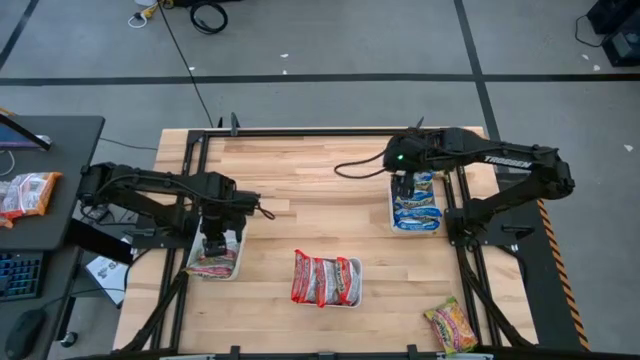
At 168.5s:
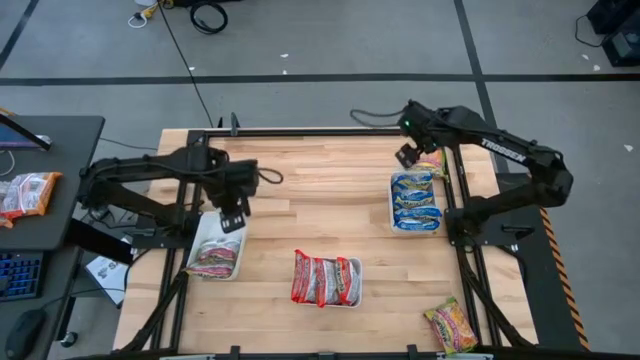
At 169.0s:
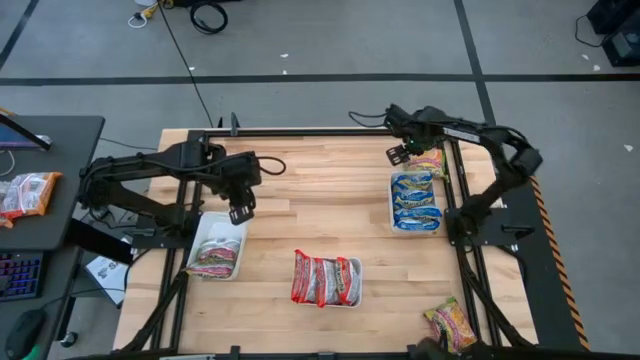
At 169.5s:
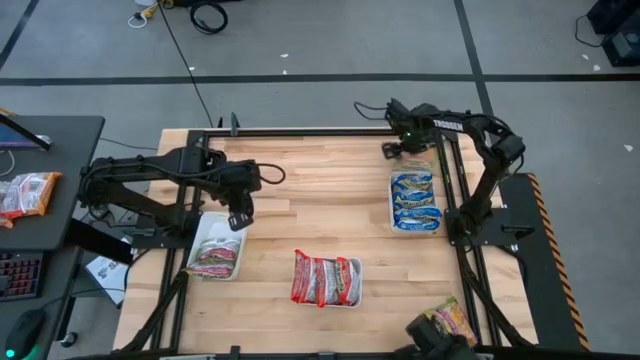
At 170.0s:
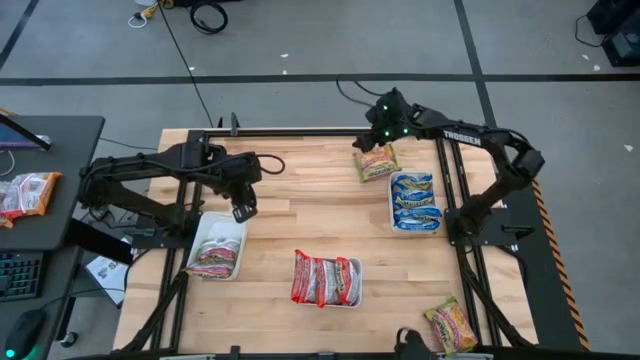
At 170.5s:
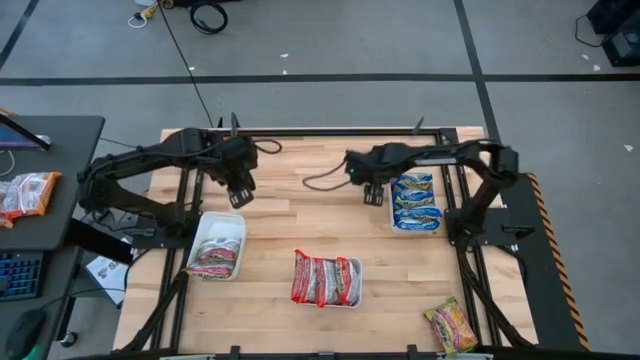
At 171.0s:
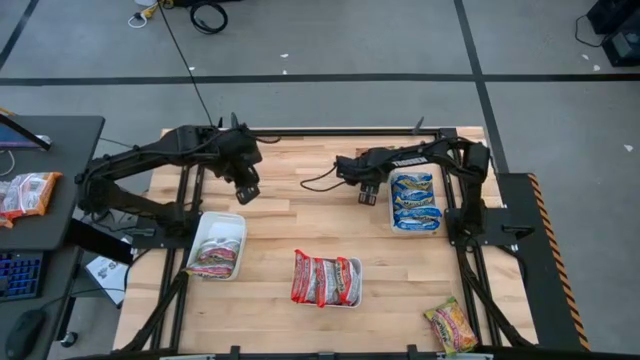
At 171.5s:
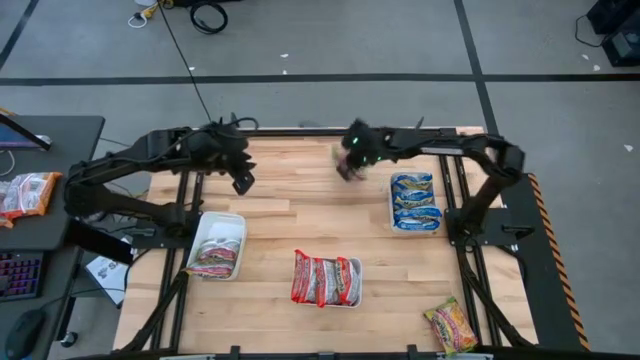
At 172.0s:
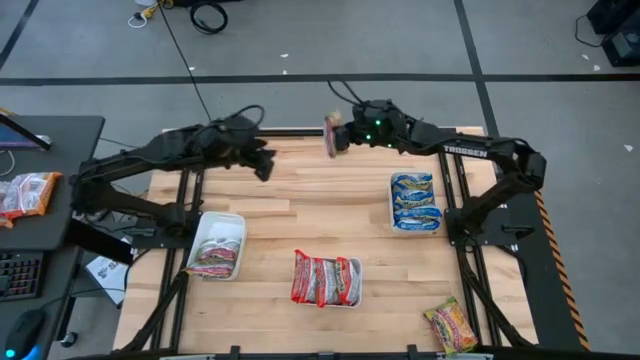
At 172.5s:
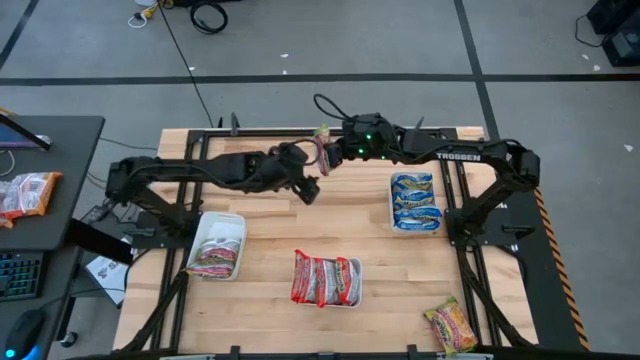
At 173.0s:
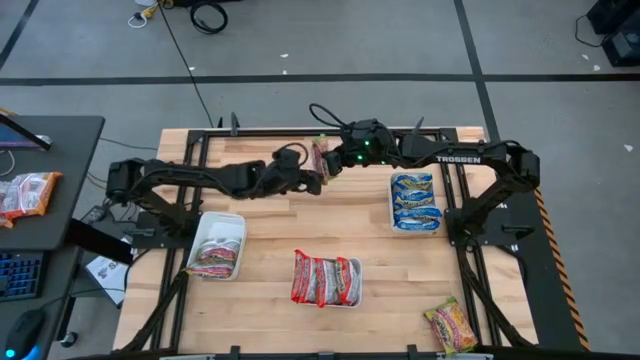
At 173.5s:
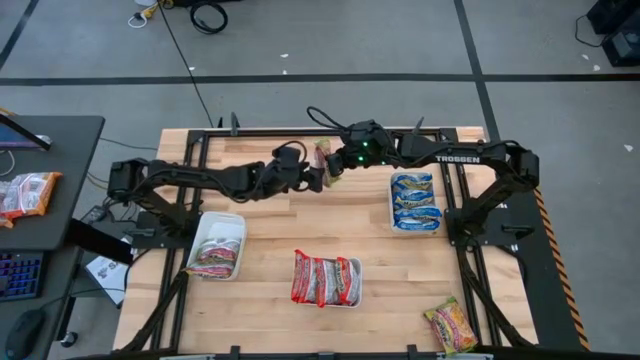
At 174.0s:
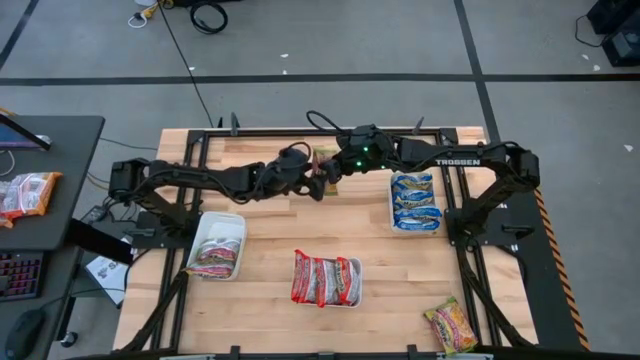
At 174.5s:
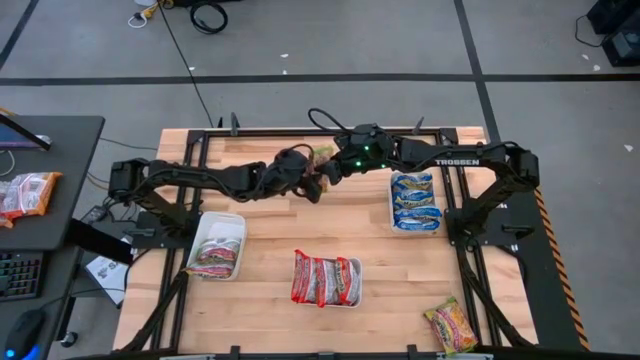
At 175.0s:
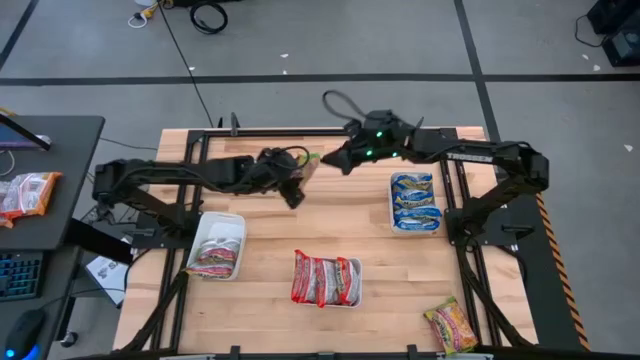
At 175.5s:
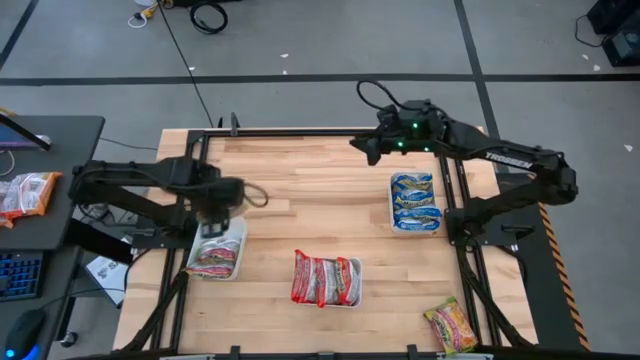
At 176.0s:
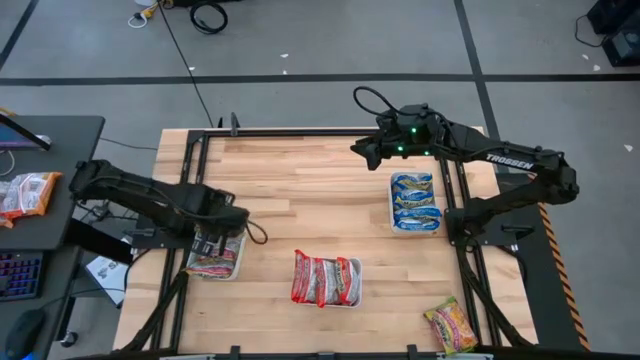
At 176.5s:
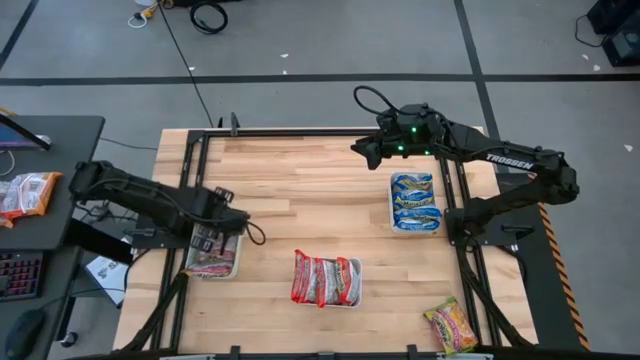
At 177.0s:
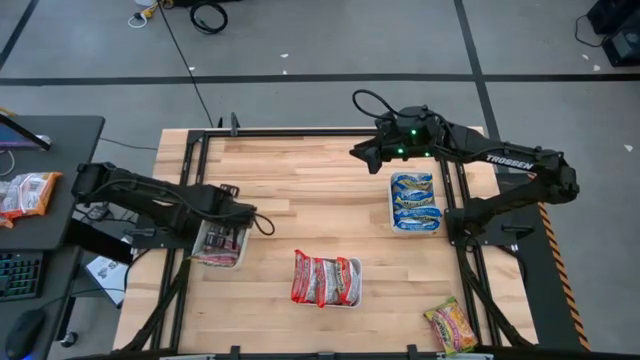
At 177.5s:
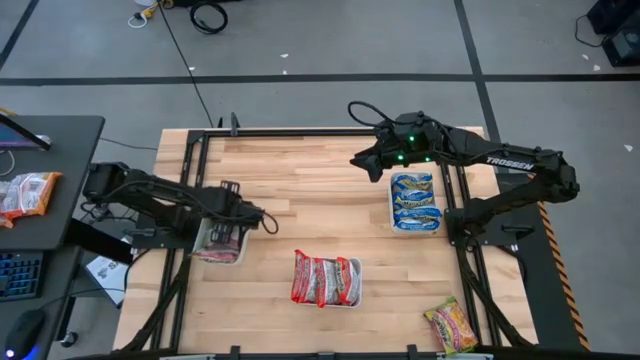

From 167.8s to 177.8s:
Task: Sort Maruchan noodles
Put the top green noodle pack into the left white bin

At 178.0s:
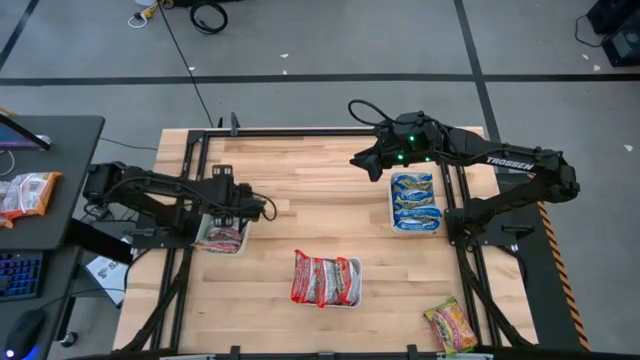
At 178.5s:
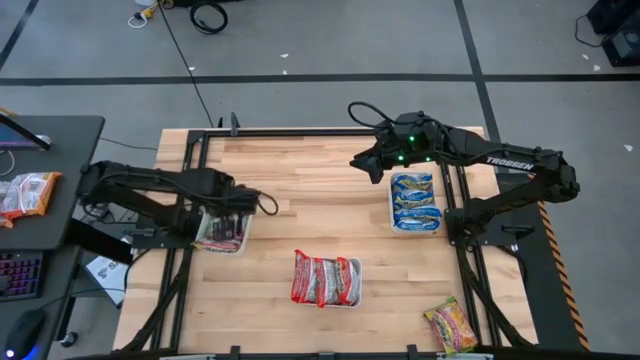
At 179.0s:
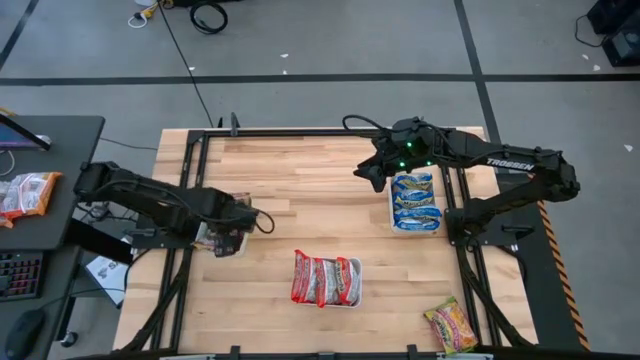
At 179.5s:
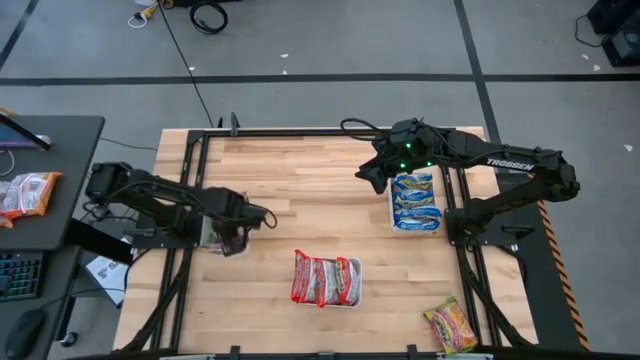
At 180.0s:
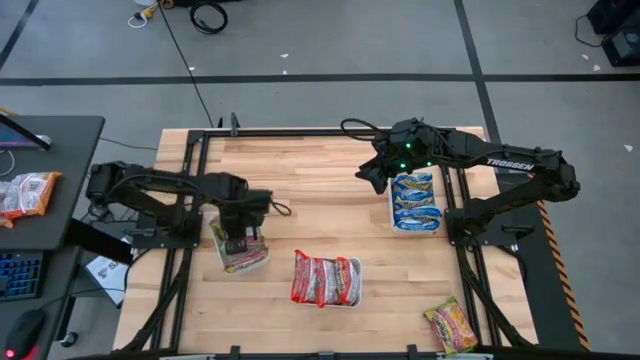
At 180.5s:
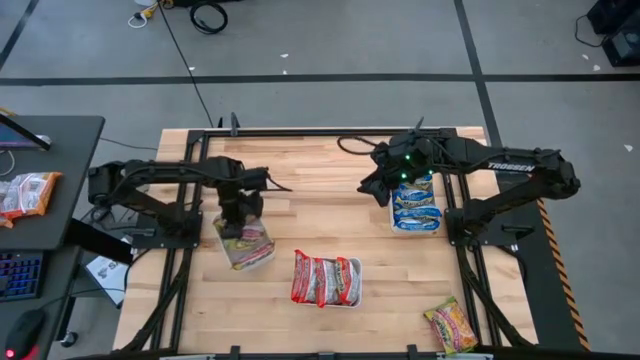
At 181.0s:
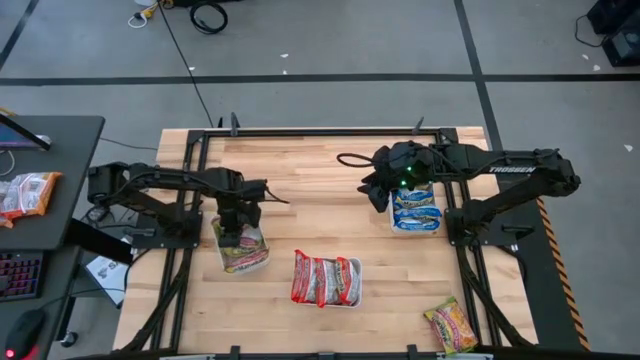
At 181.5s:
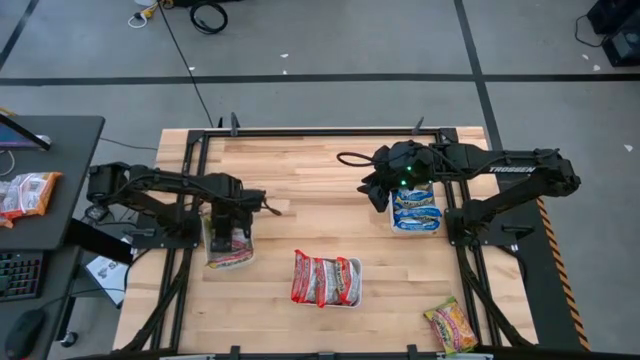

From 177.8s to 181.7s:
Adjust the green noodle pack on the left white bin

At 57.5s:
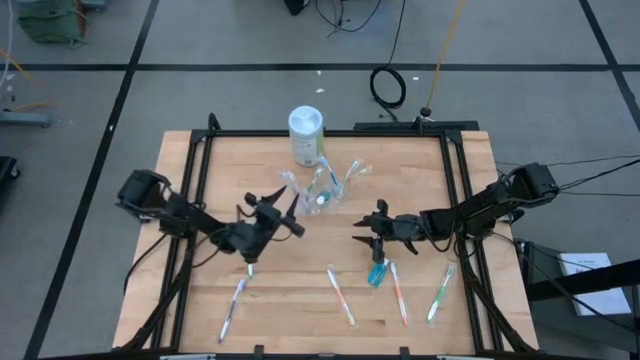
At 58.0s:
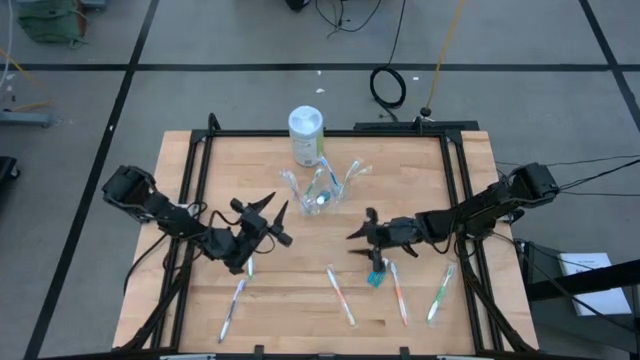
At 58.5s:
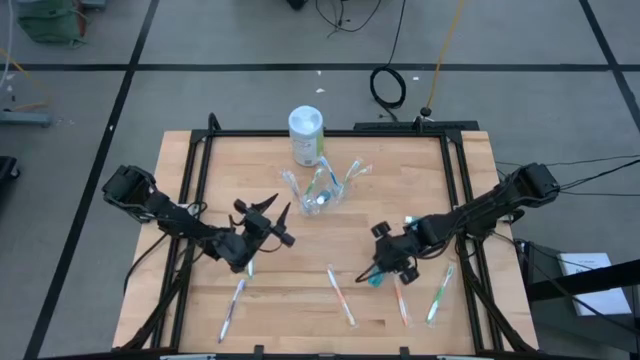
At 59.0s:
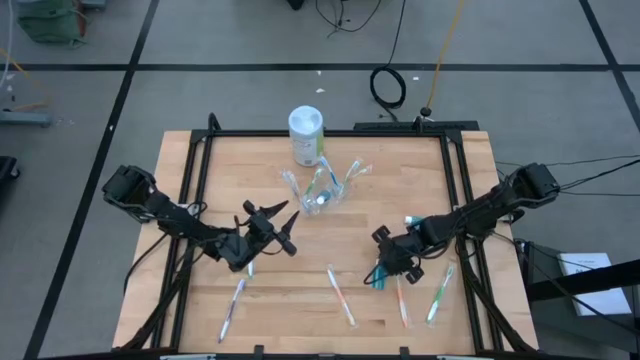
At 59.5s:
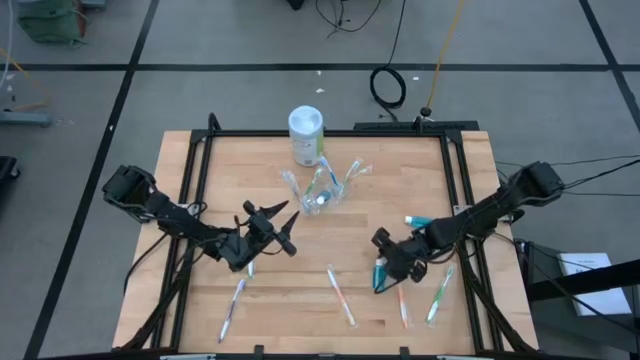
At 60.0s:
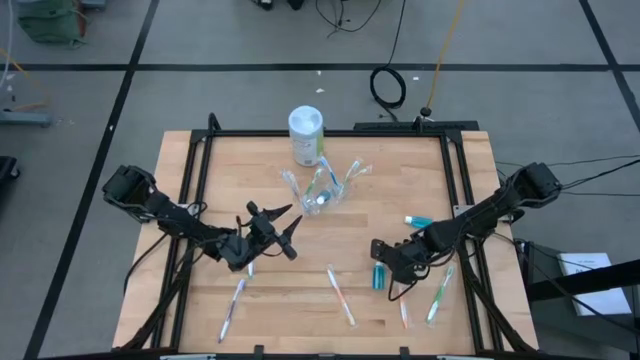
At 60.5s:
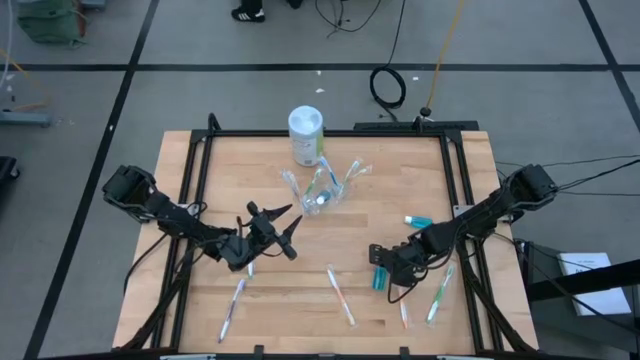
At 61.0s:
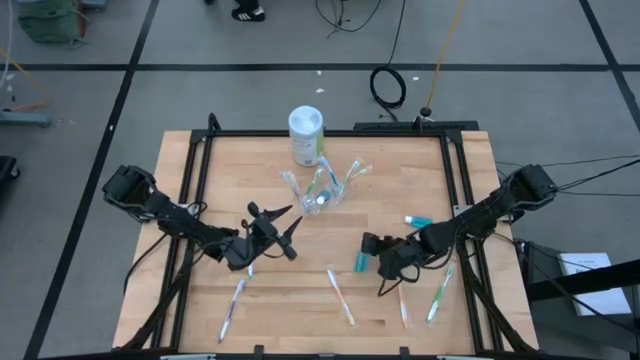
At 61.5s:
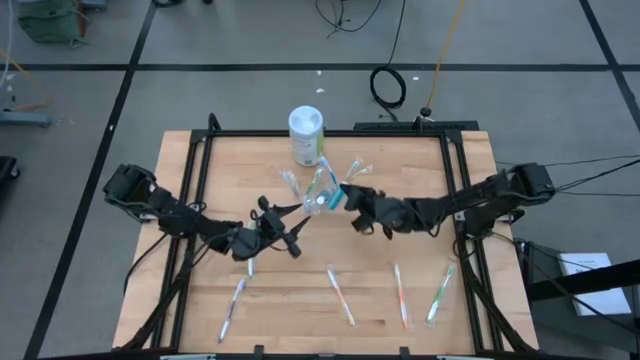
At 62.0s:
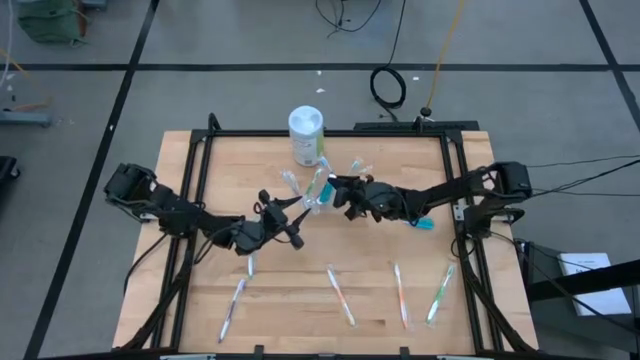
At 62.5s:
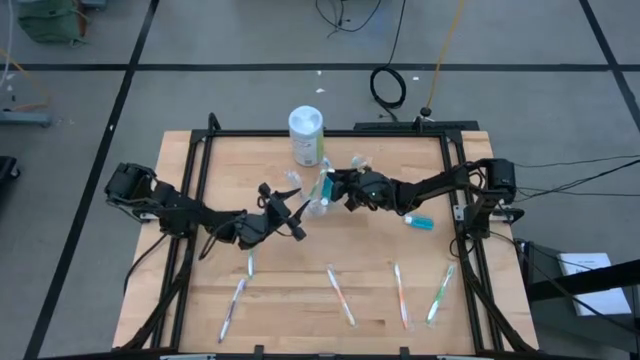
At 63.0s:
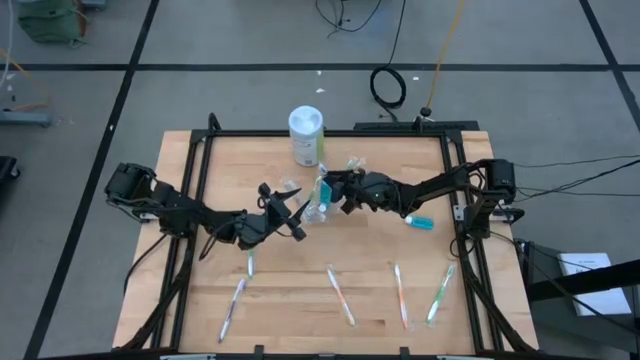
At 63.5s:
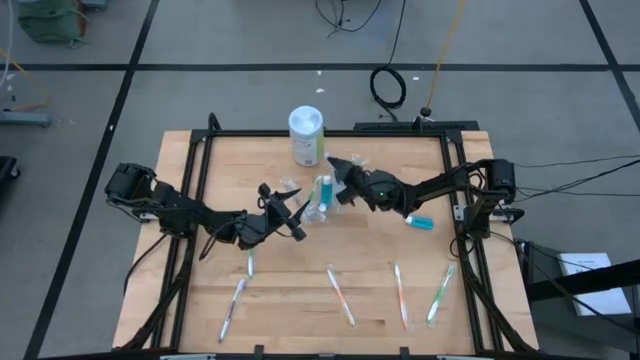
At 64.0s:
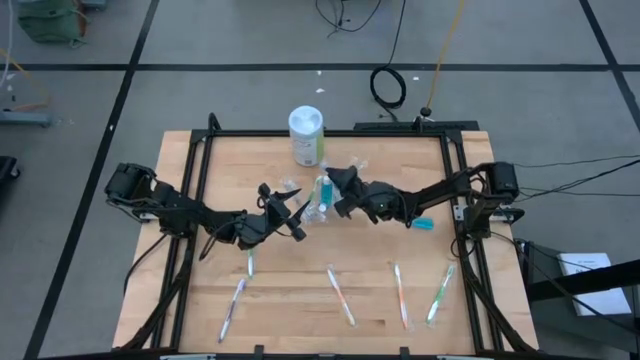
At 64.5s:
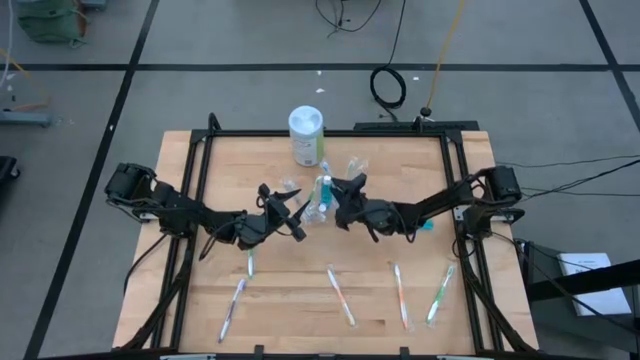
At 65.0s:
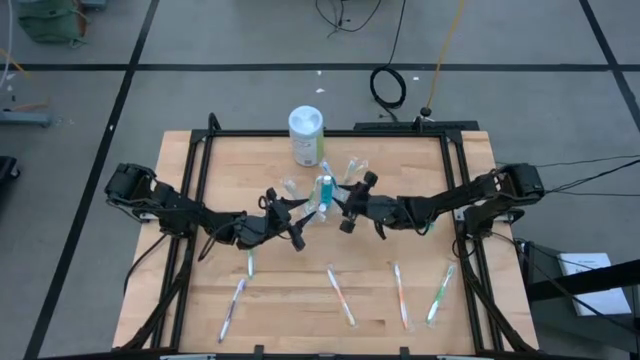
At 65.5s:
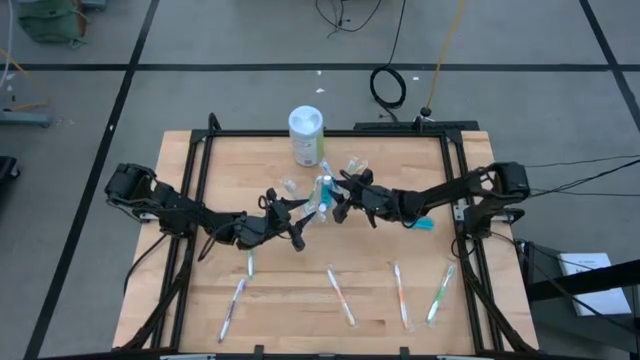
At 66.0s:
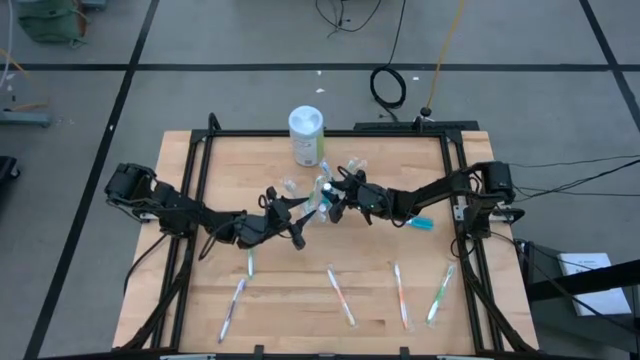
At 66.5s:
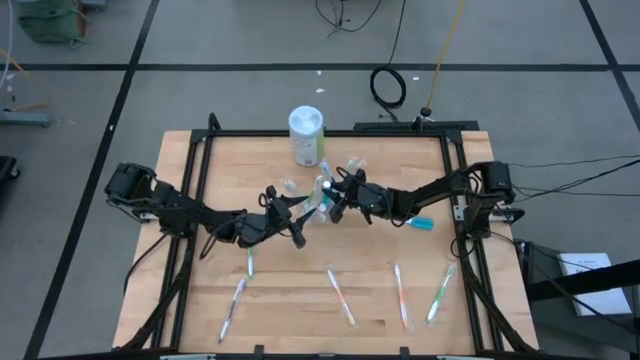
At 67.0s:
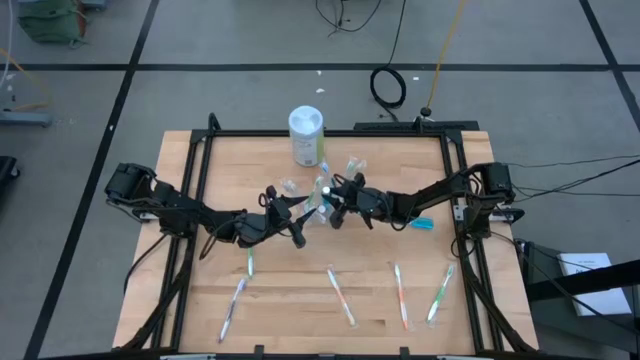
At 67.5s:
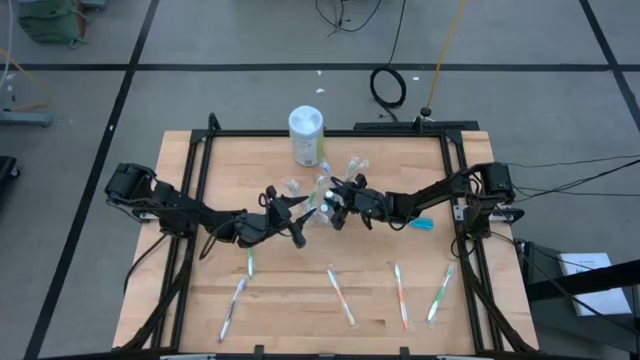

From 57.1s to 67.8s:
Task: Pick & Place toothbrushing station
Put the blue mouthwash into the transparent organizer
